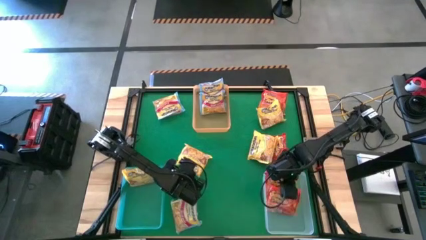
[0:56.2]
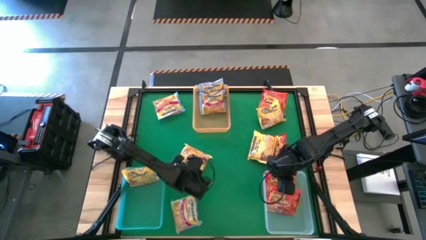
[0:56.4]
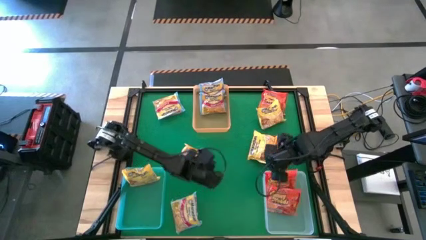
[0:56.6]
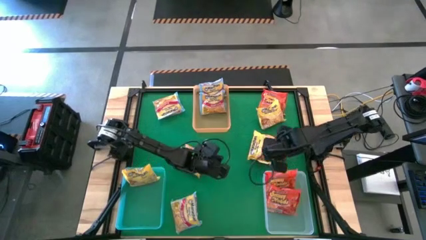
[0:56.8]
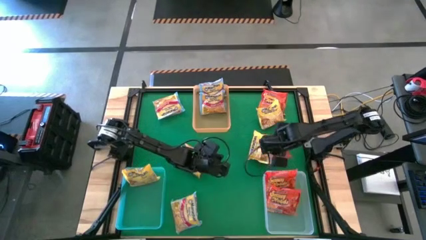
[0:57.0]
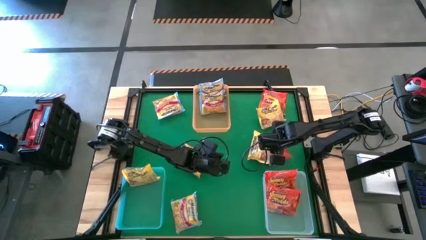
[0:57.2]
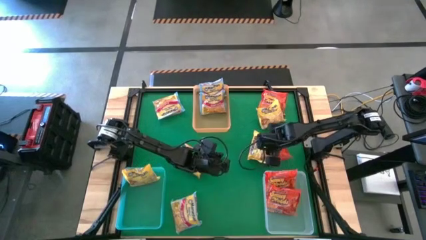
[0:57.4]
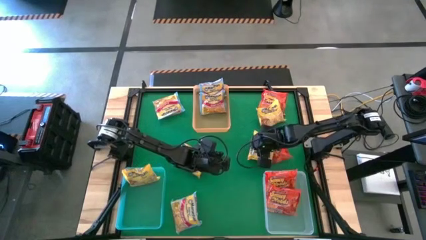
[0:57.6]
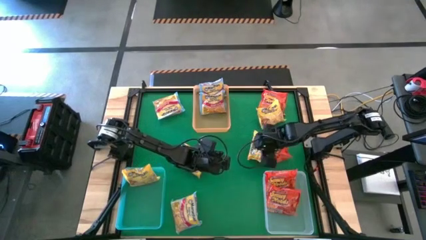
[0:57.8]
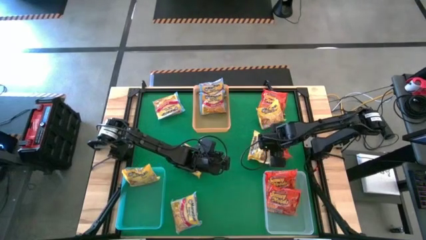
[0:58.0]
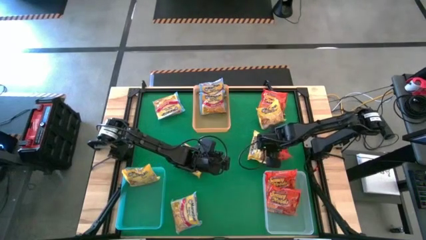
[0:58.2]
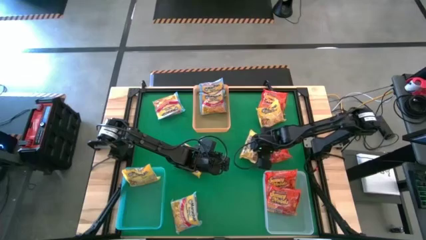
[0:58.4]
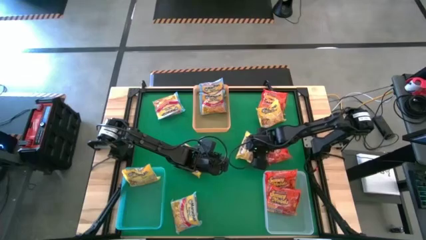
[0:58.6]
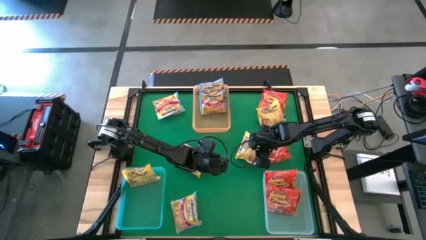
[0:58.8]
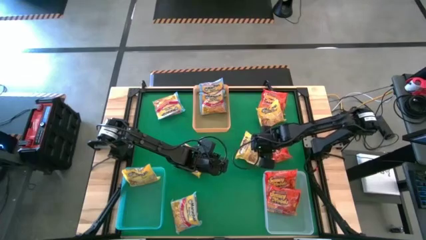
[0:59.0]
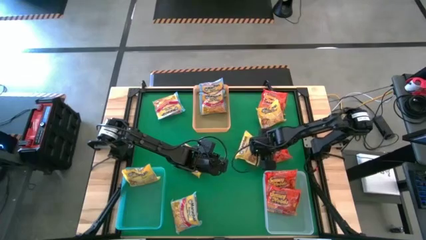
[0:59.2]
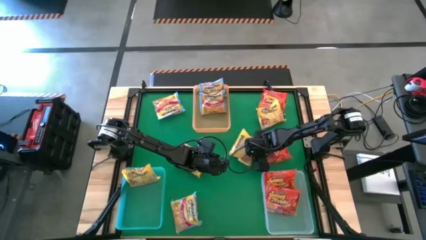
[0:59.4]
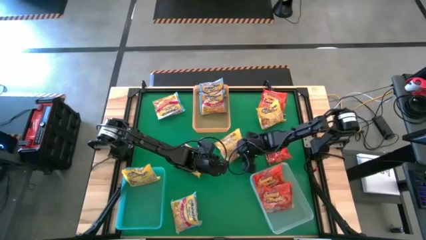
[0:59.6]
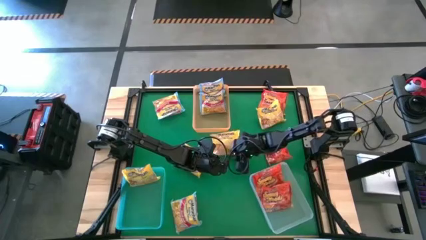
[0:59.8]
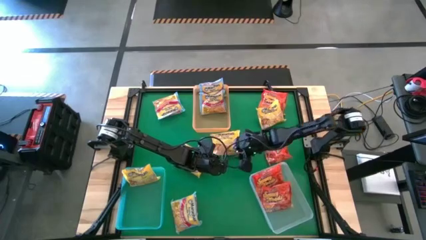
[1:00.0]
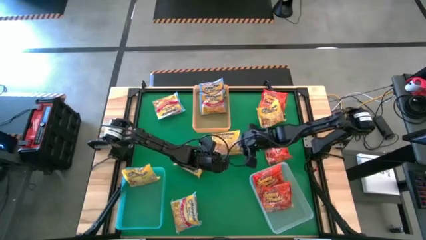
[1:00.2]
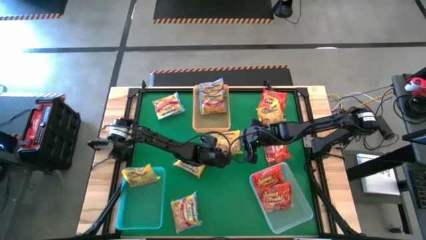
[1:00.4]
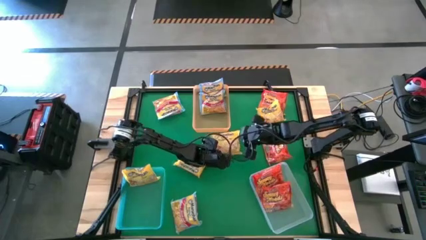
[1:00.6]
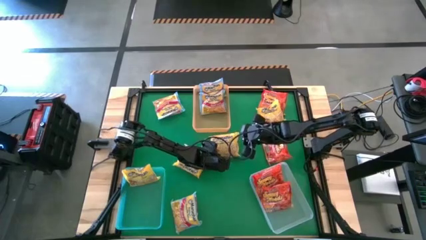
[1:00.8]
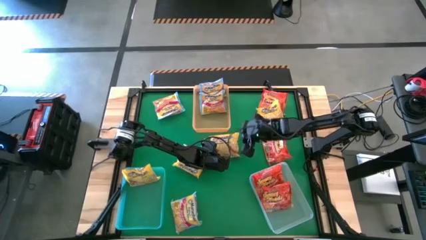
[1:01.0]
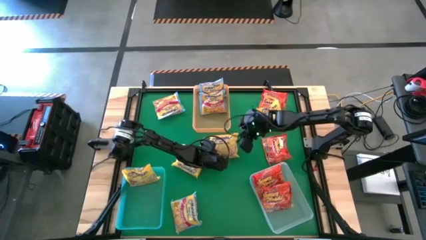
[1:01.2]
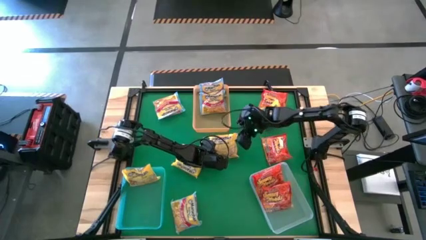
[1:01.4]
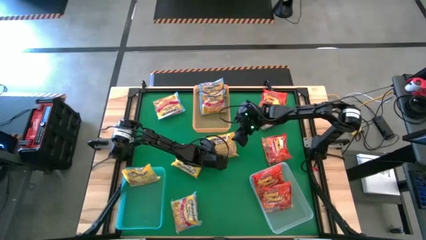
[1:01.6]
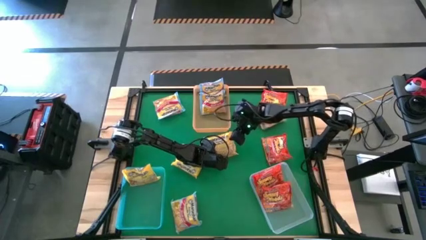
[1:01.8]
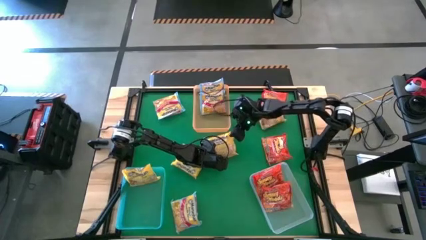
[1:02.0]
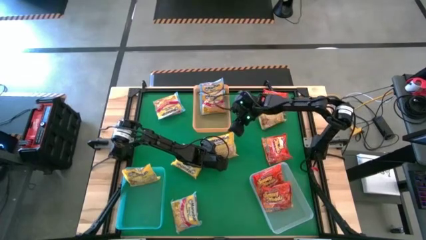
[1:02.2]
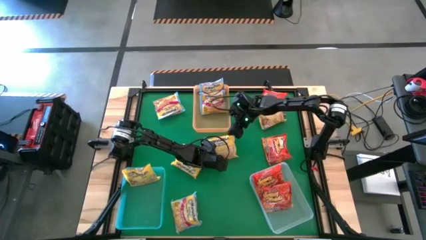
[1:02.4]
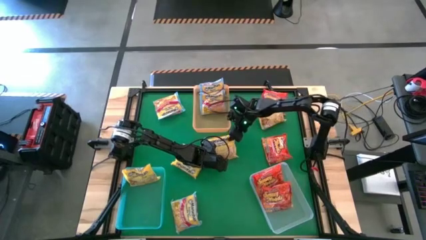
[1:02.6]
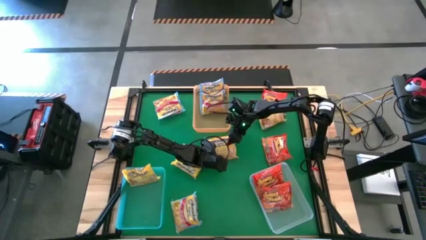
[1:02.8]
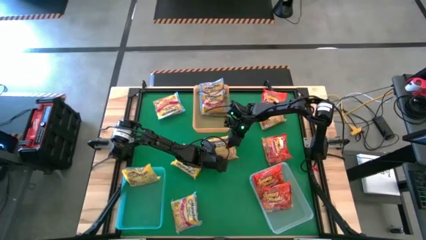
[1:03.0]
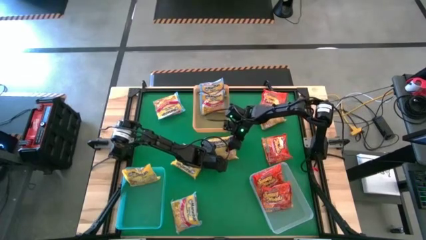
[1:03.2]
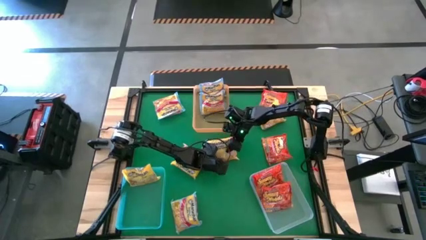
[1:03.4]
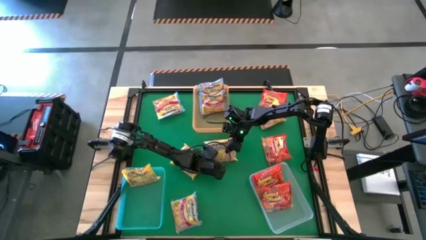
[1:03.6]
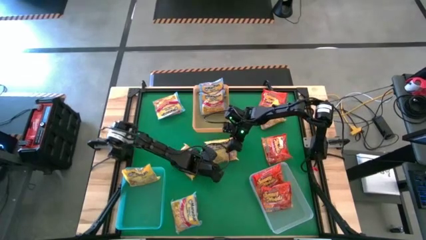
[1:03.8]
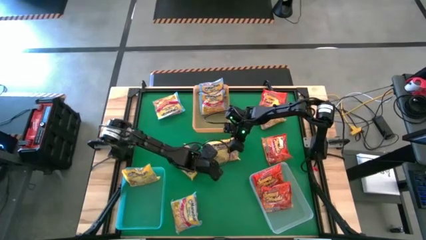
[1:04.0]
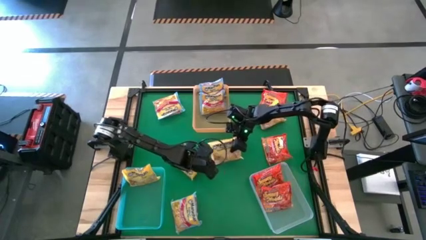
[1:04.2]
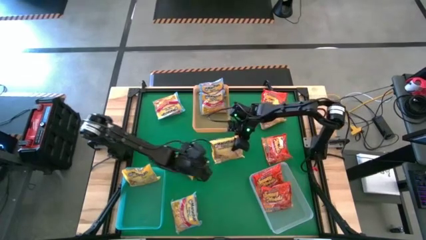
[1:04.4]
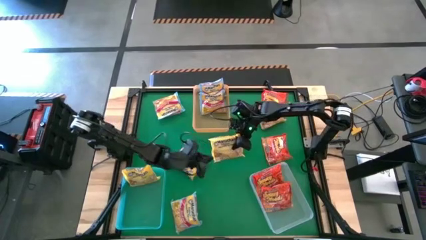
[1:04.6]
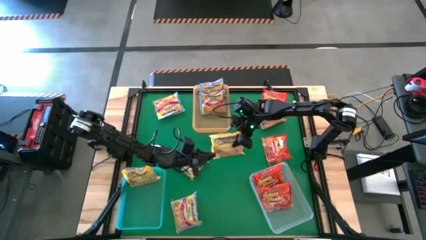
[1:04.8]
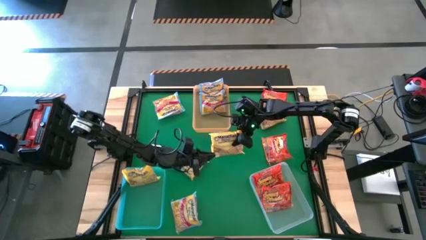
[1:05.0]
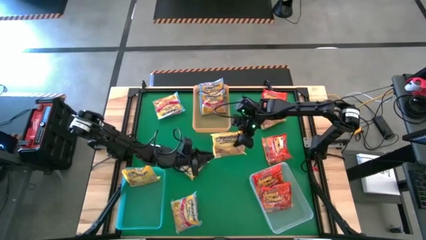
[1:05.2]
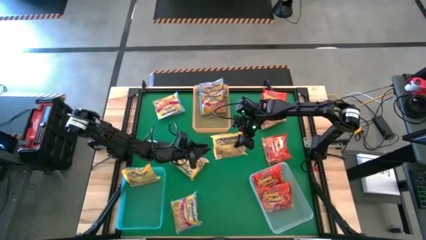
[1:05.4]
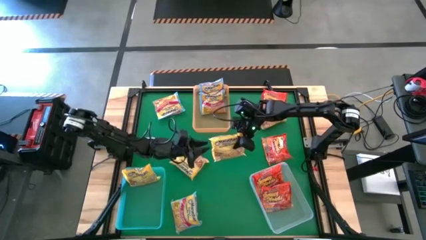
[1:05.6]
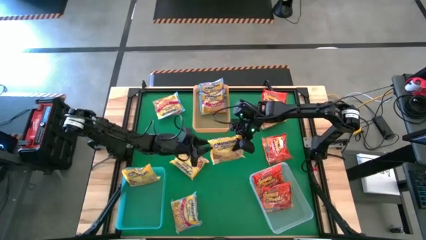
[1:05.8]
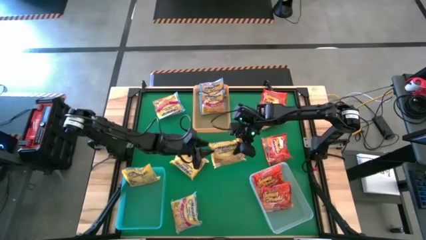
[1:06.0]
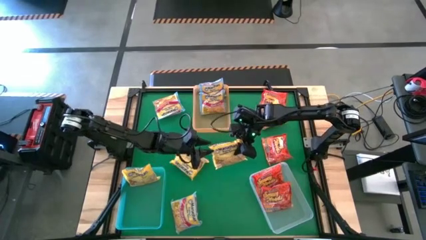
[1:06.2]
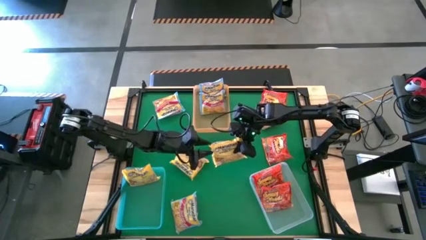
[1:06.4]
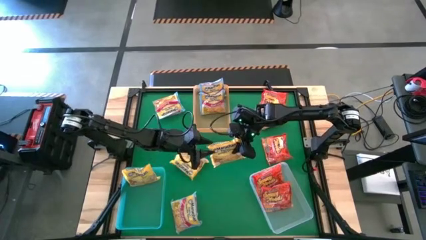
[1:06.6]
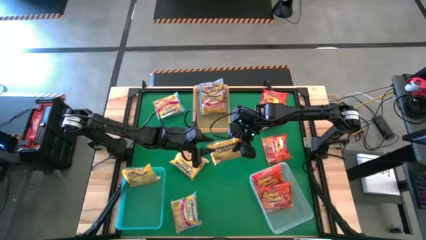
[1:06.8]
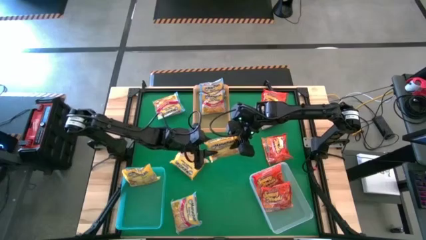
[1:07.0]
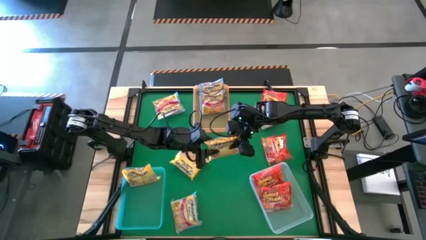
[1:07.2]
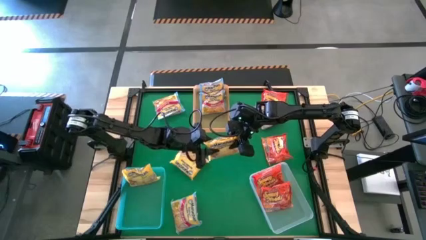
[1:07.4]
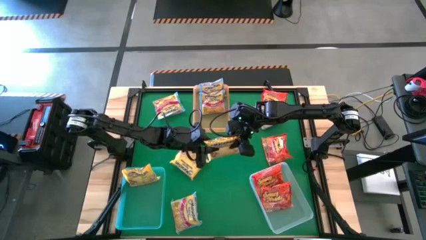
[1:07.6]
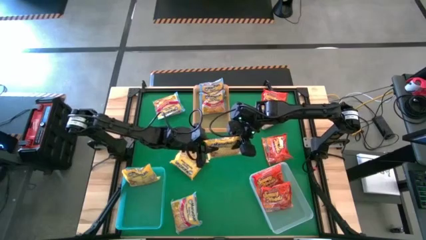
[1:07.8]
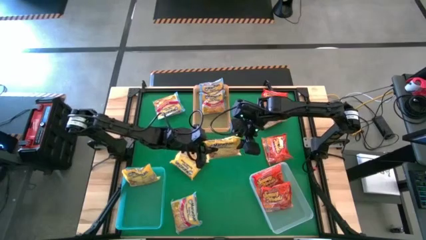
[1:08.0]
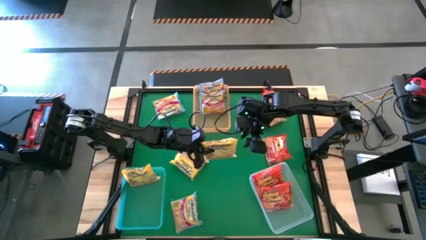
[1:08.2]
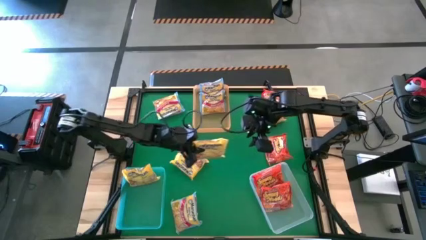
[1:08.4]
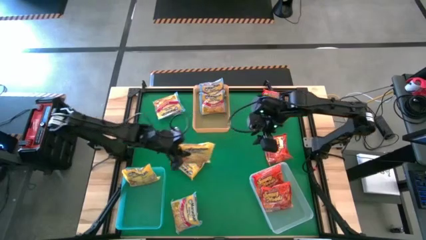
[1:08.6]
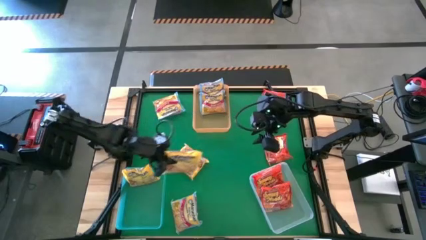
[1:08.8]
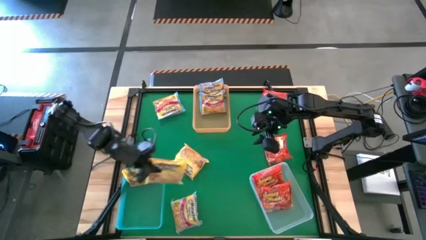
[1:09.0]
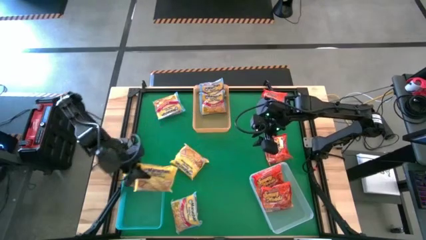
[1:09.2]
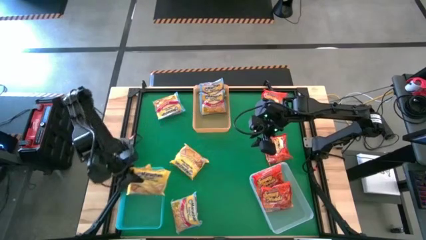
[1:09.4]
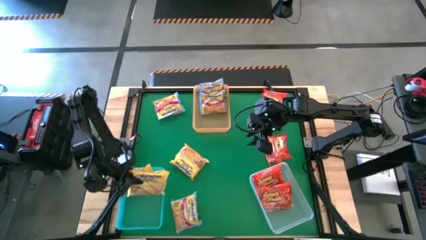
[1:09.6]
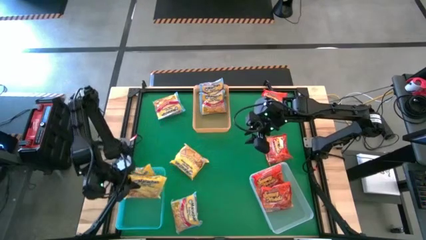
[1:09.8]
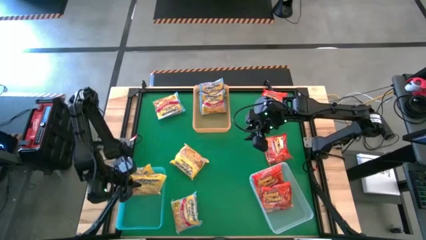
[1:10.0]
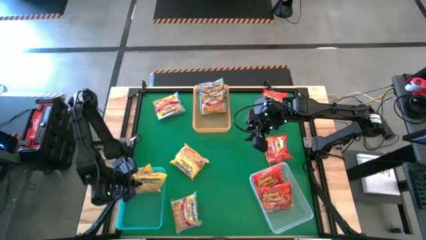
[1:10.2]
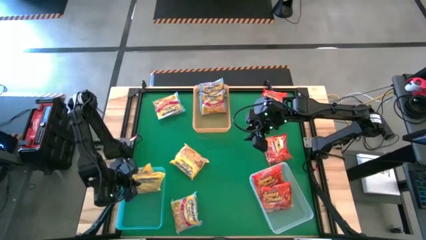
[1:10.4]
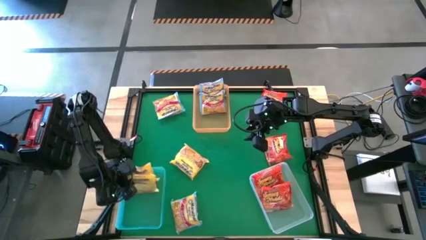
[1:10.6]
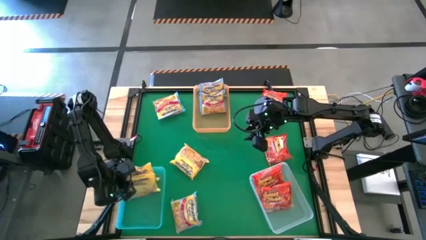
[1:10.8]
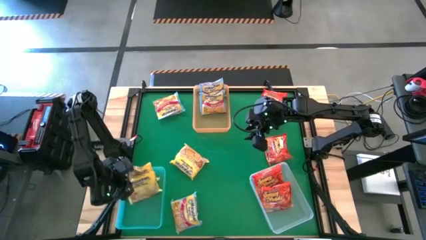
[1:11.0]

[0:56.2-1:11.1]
Task: Sort Maruchan noodles
Put the yellow noddle pack into the blue bin
